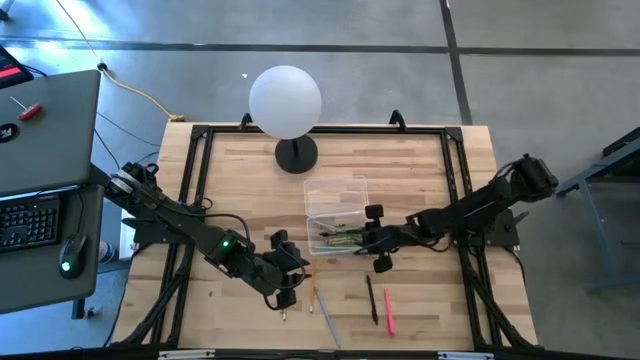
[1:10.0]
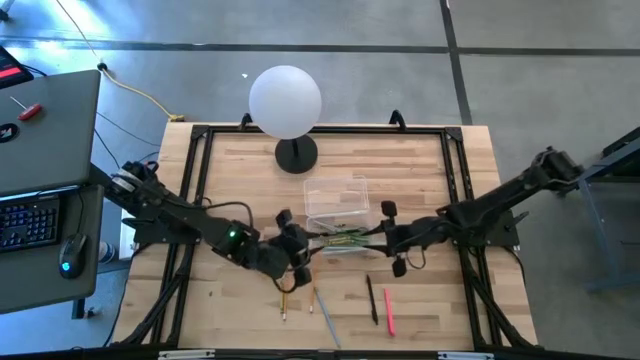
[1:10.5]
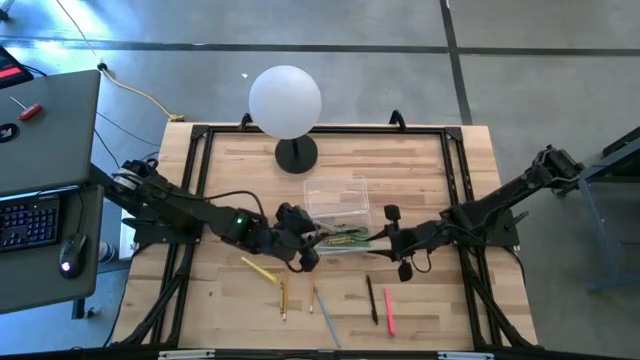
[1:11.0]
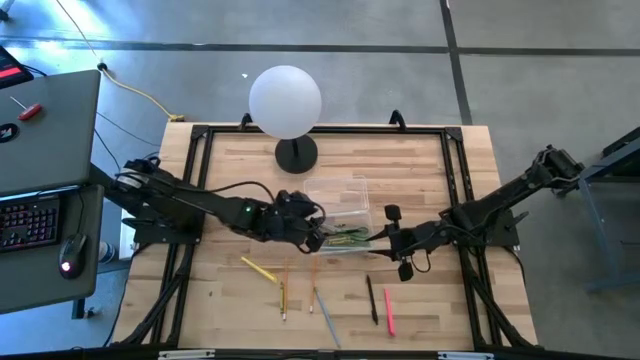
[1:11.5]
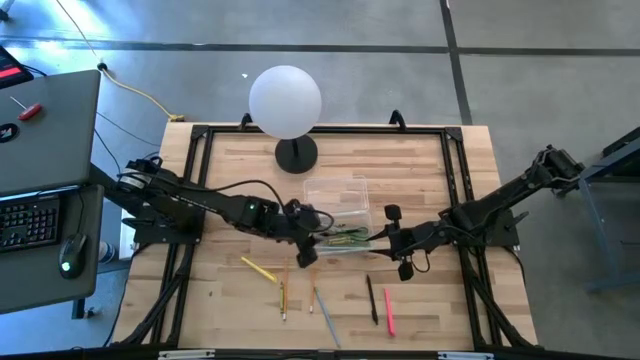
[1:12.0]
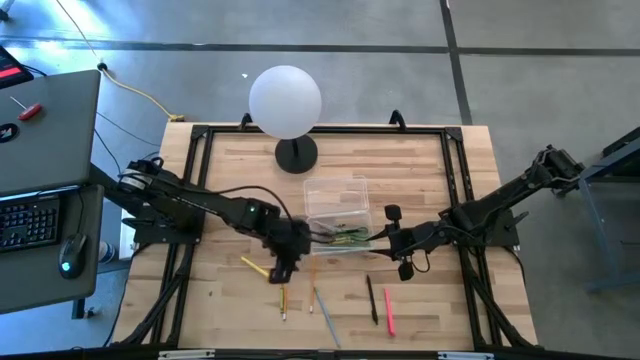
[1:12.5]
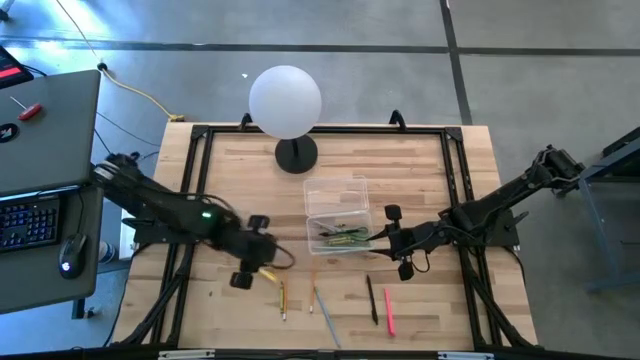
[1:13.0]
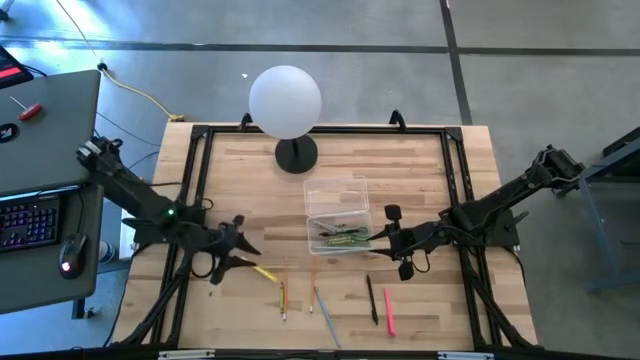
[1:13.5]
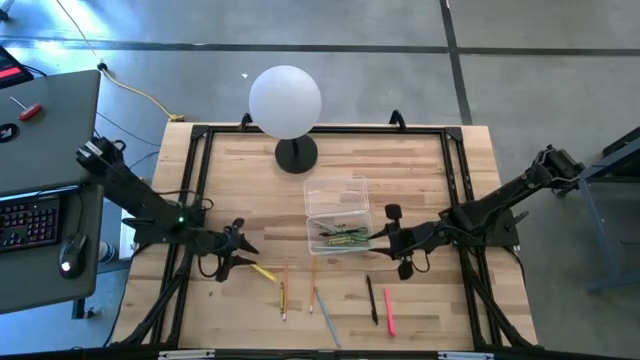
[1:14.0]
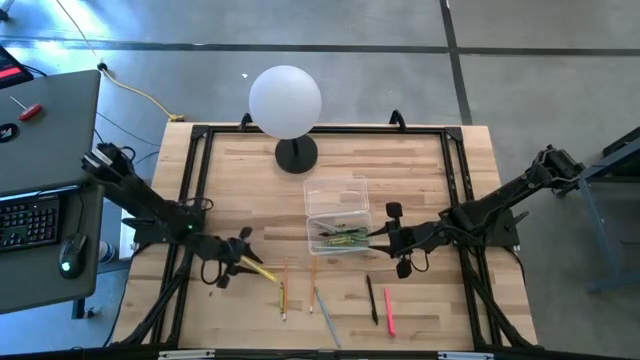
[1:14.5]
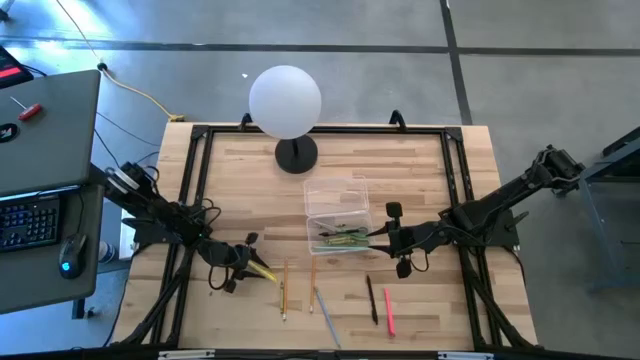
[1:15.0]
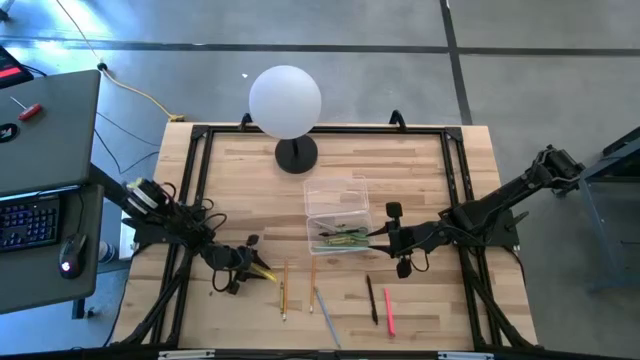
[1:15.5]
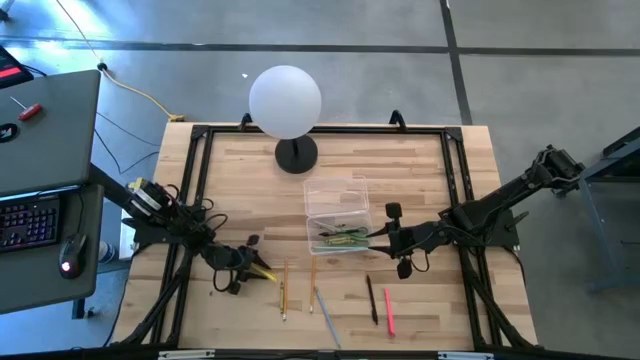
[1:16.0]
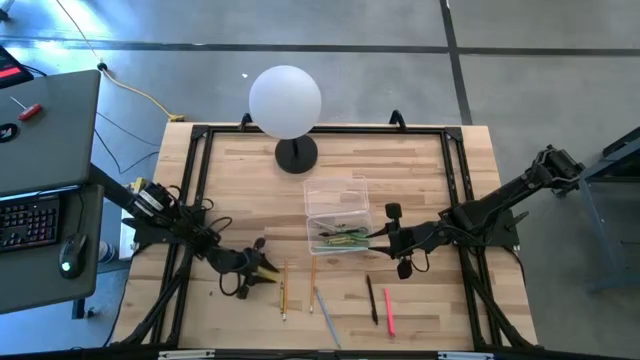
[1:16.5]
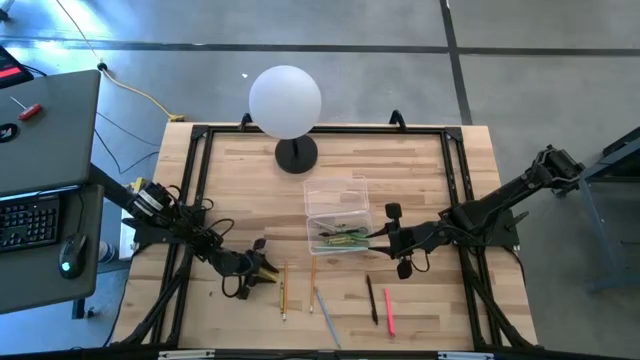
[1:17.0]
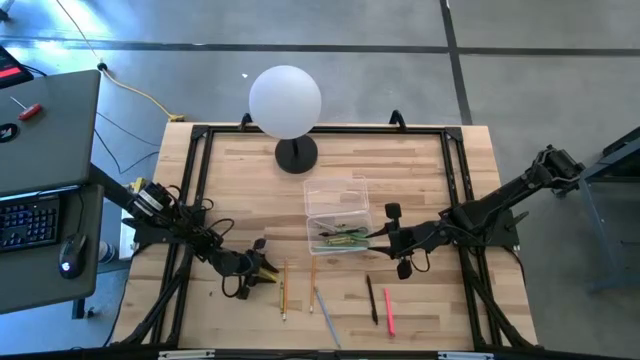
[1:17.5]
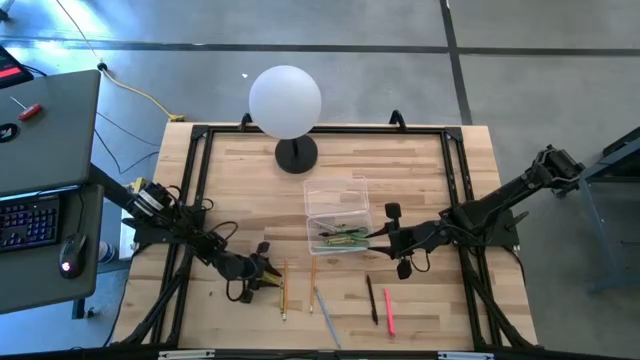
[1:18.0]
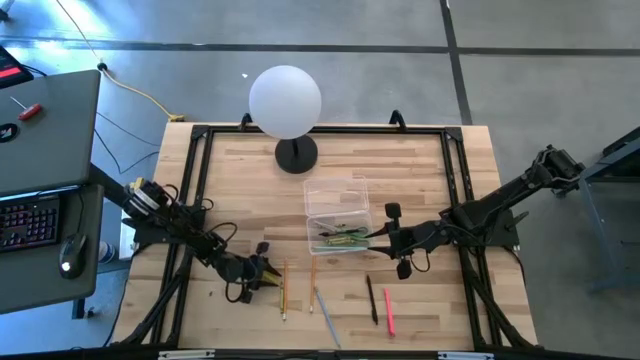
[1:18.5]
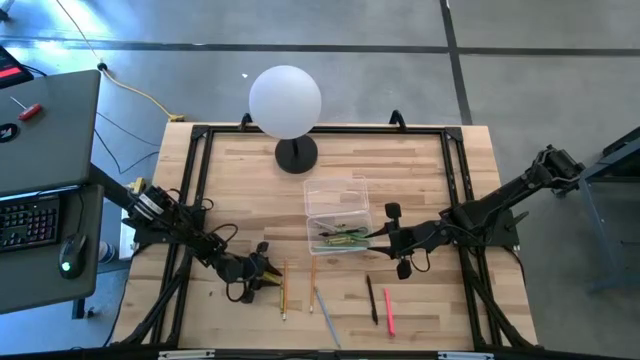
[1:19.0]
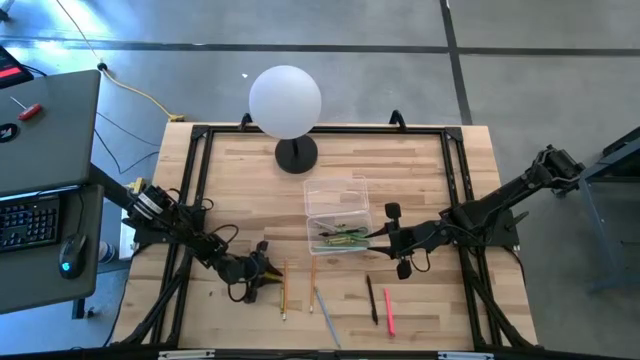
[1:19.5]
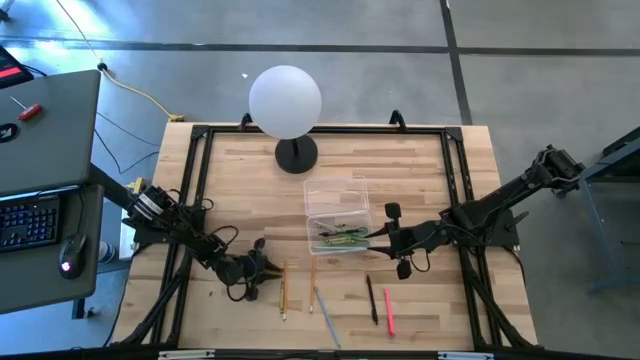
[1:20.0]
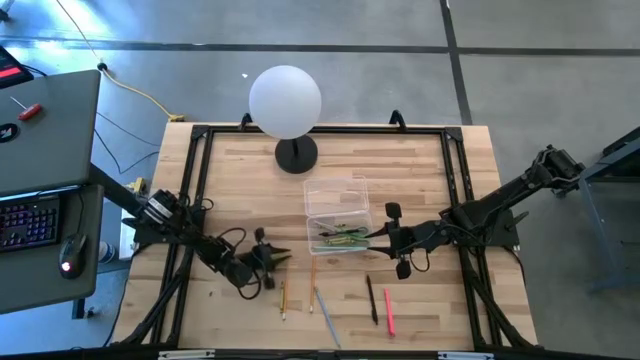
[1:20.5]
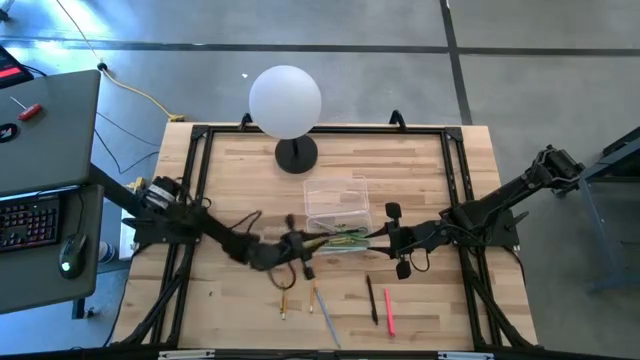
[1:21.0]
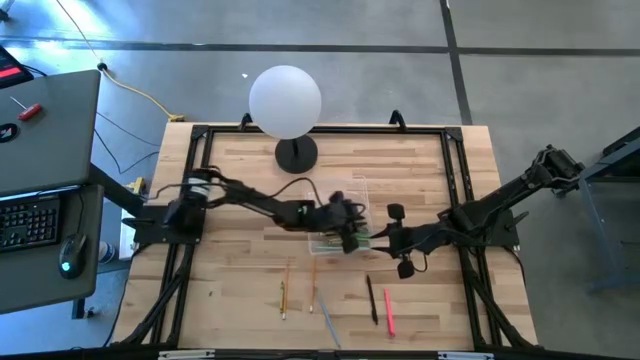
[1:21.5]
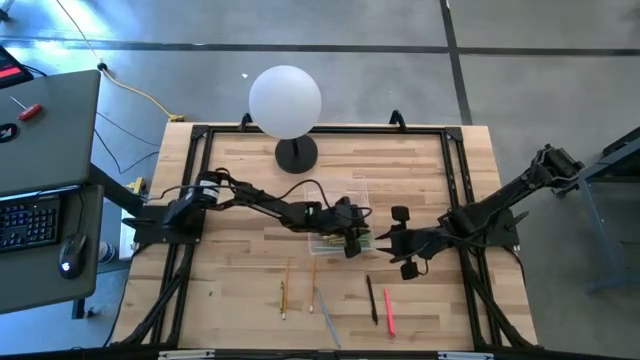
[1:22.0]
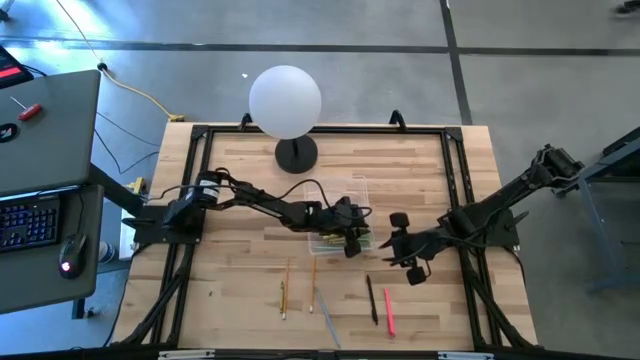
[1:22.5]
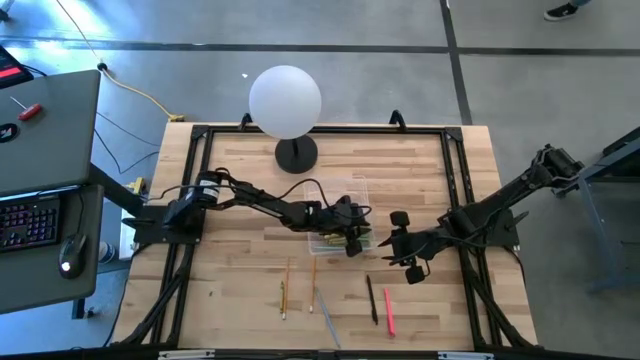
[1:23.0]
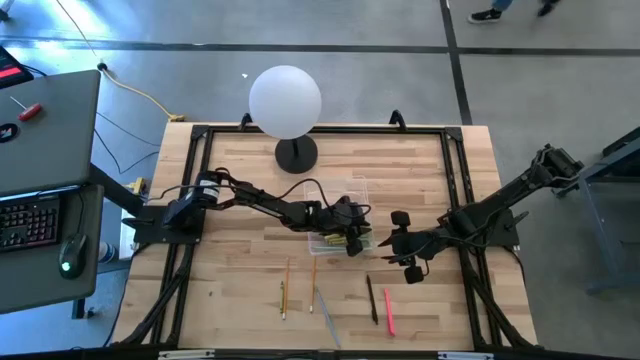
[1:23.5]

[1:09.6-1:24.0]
Task: Pick & place school supplies into a supply box
Put the yellow pen into the transparent supply box

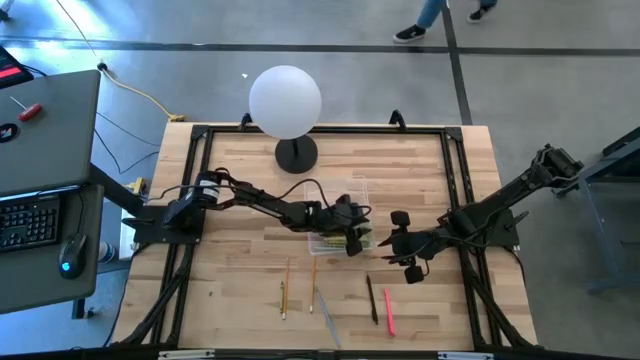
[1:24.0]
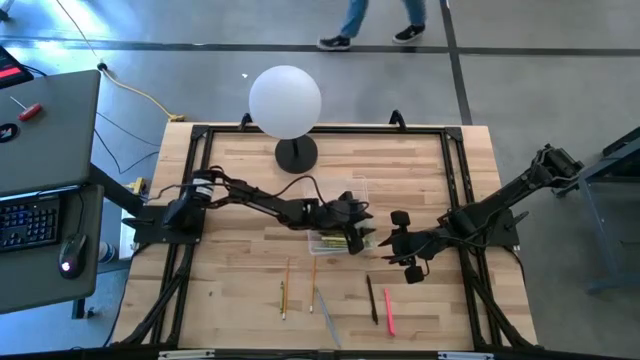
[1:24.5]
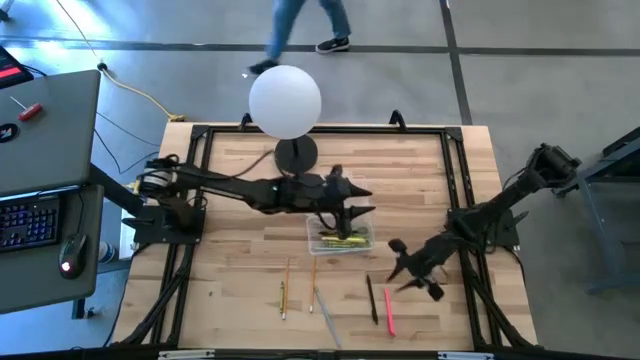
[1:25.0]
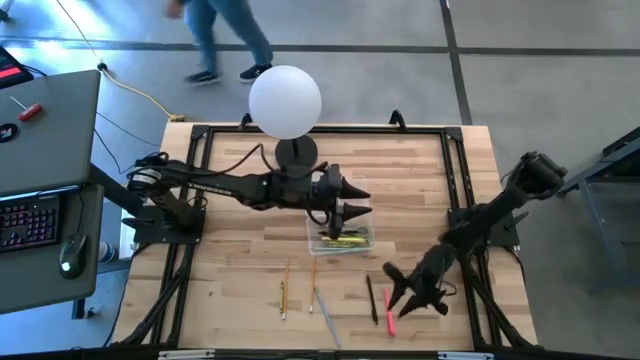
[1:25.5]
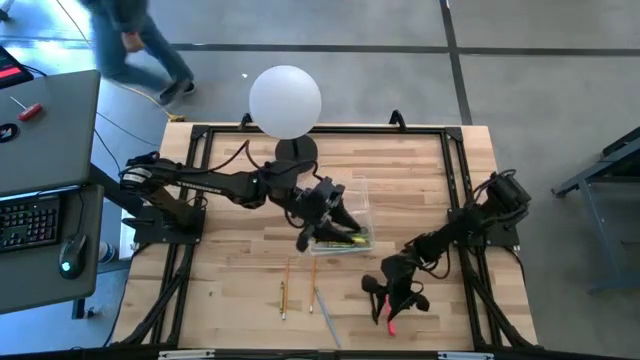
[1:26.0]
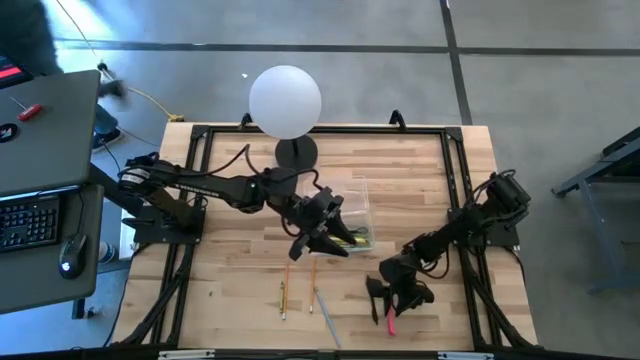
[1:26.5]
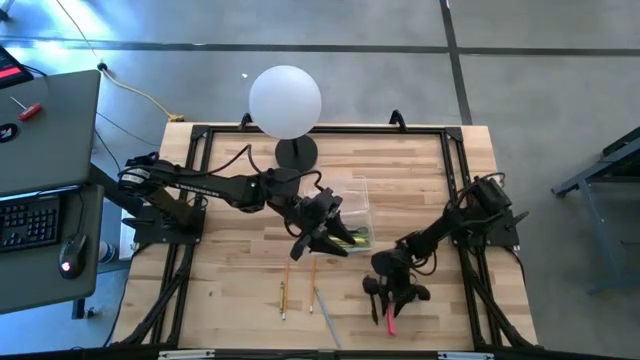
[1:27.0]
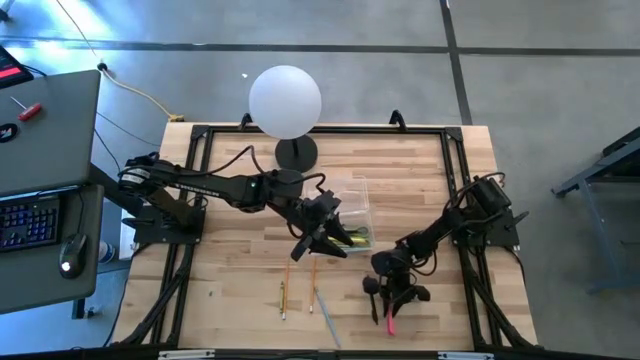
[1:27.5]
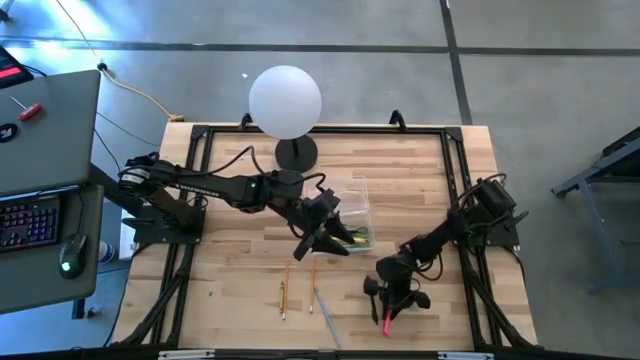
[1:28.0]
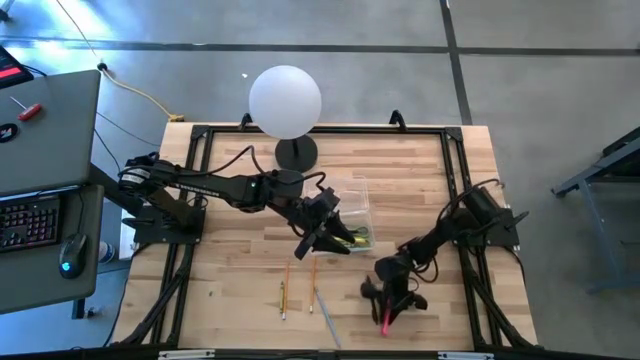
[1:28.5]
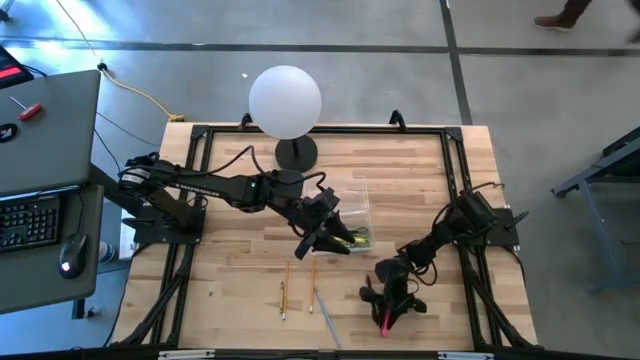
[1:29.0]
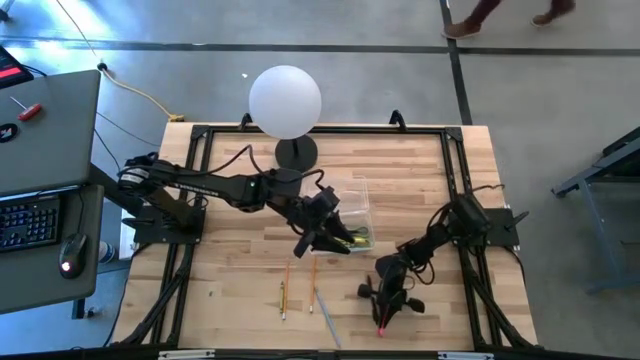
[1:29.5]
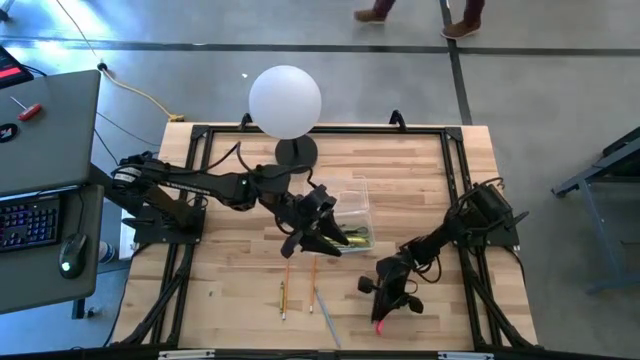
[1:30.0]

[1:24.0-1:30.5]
Put the pink pen into the transparent supply box

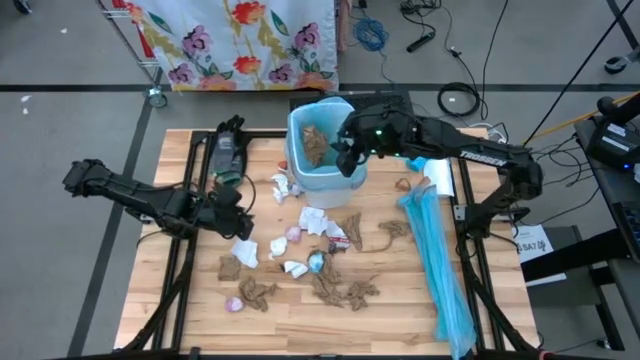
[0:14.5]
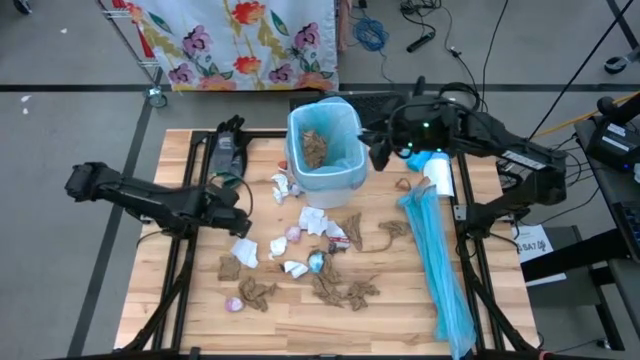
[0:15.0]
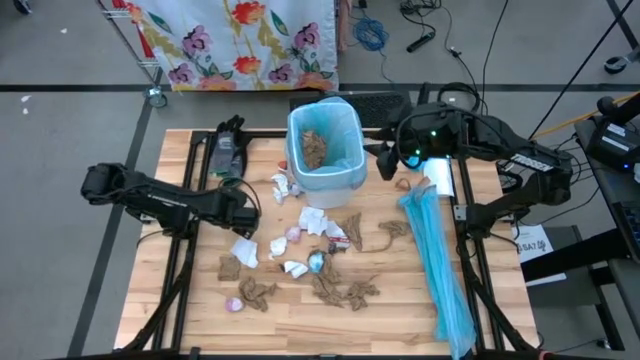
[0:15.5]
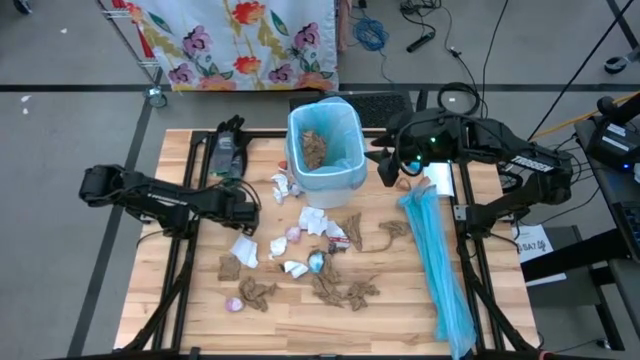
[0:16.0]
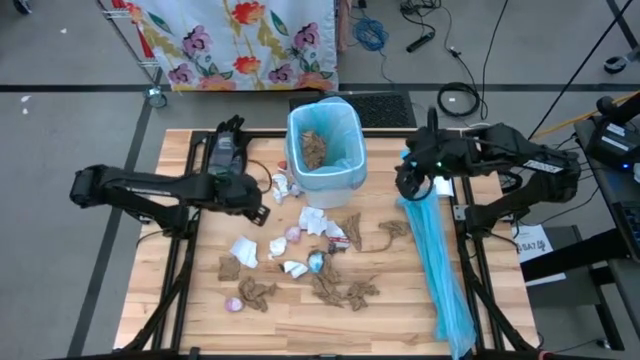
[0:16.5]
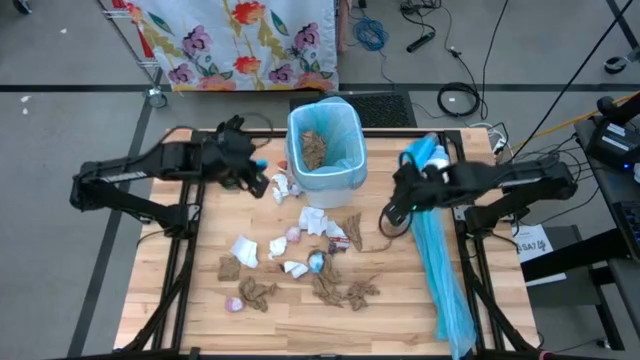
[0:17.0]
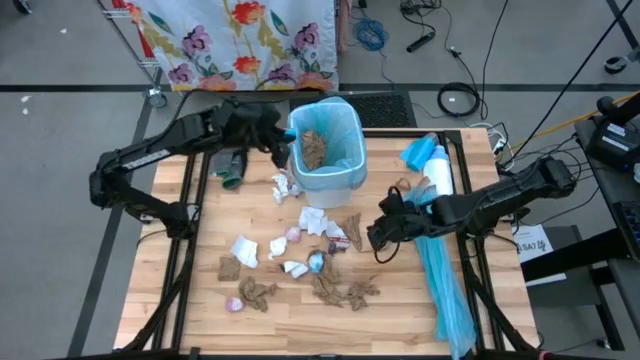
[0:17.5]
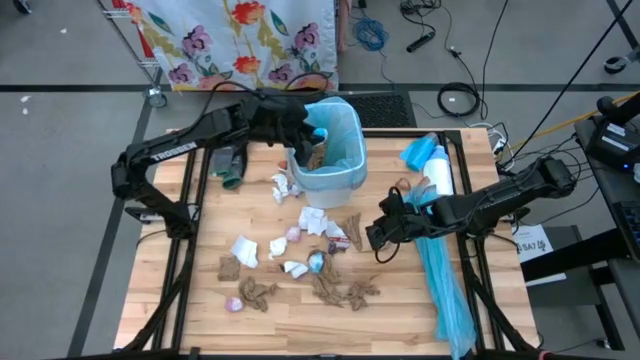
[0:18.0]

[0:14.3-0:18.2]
Task: place trash/remove bag and relplace
Put the crumpled blue trash bag into the trash bin
